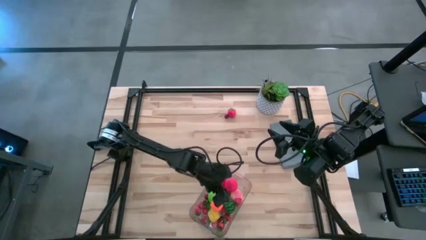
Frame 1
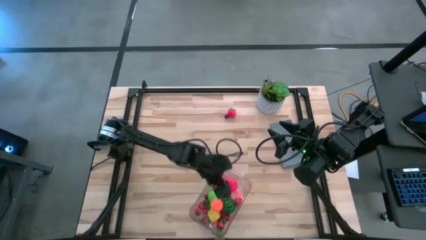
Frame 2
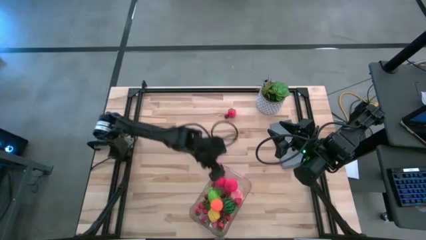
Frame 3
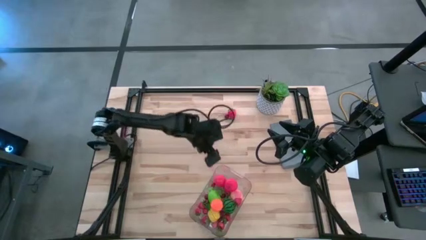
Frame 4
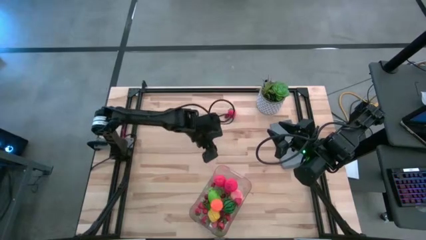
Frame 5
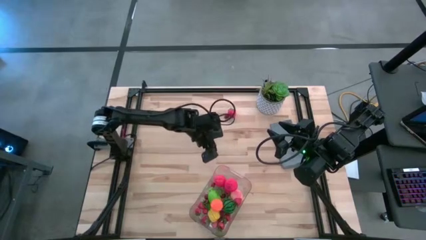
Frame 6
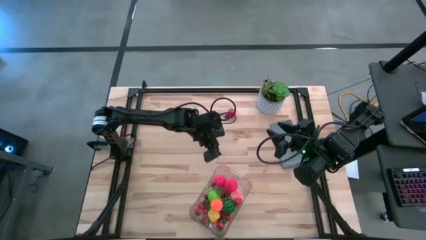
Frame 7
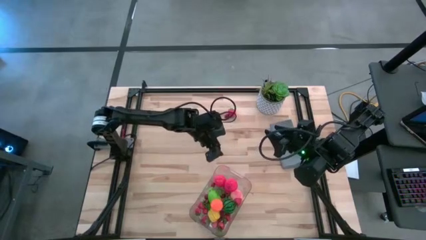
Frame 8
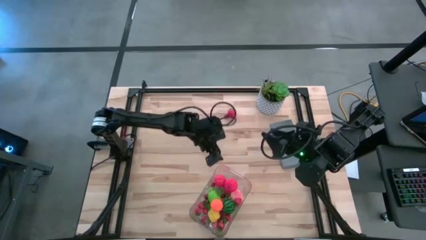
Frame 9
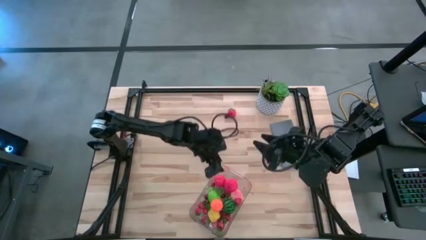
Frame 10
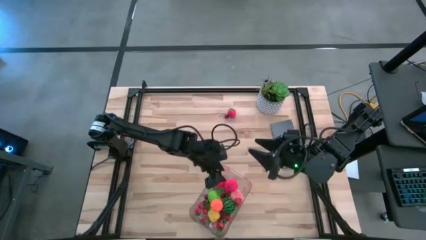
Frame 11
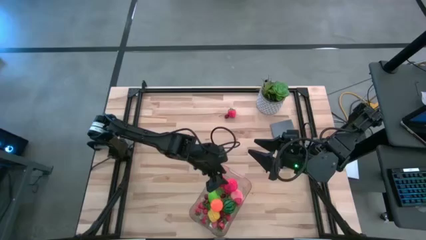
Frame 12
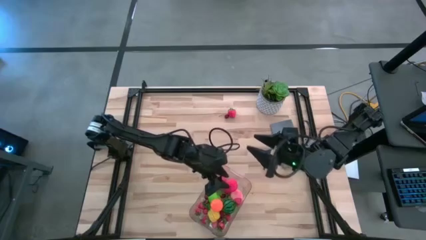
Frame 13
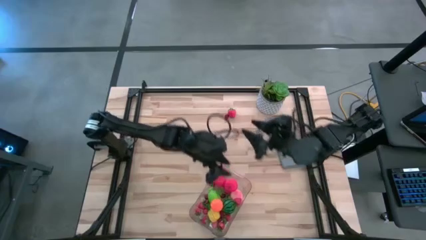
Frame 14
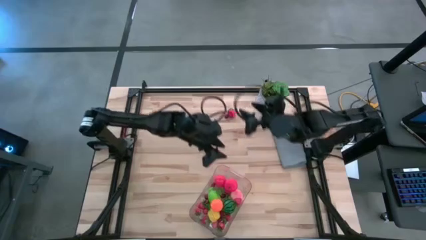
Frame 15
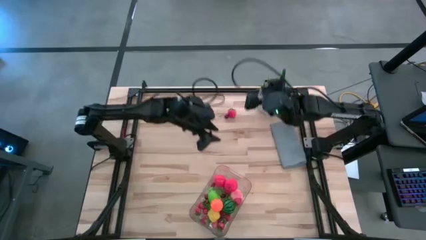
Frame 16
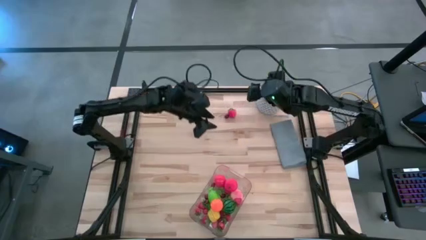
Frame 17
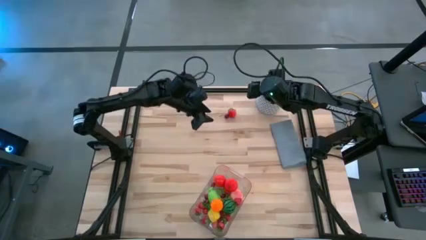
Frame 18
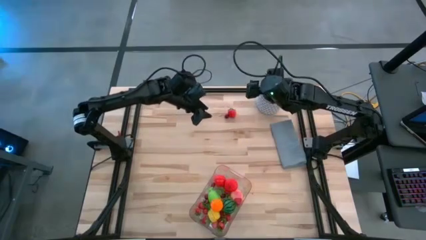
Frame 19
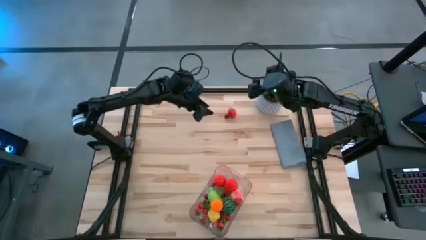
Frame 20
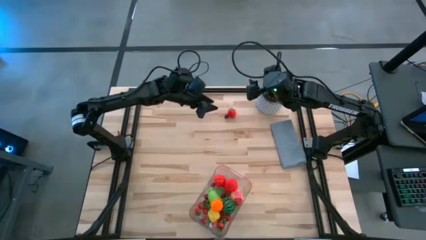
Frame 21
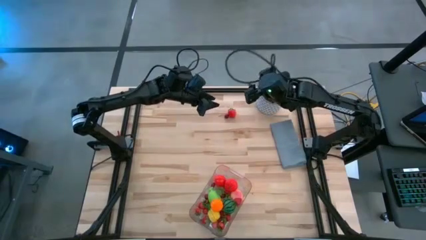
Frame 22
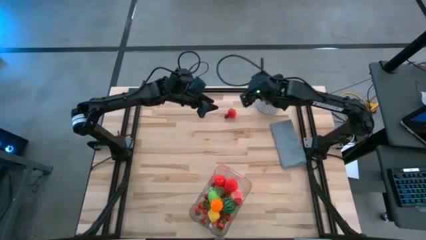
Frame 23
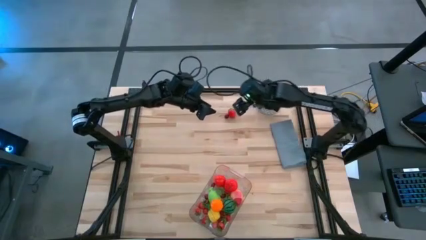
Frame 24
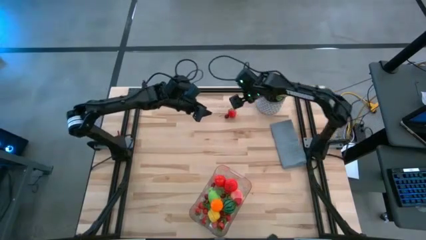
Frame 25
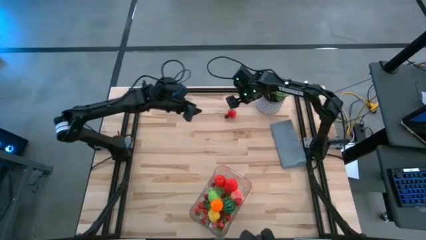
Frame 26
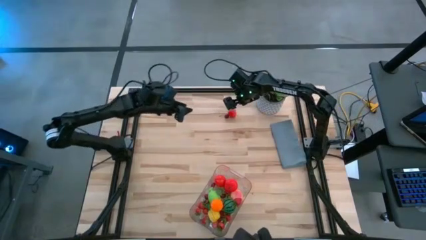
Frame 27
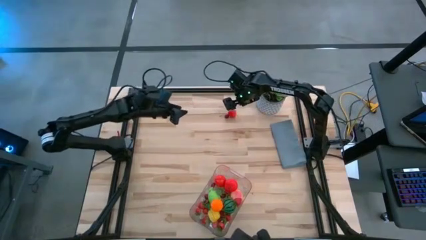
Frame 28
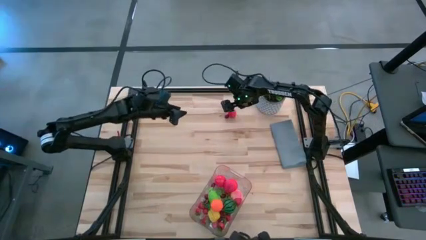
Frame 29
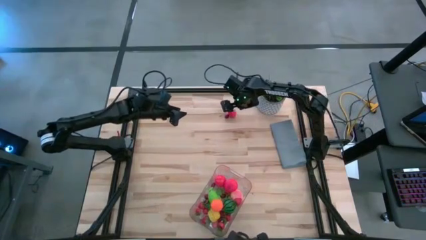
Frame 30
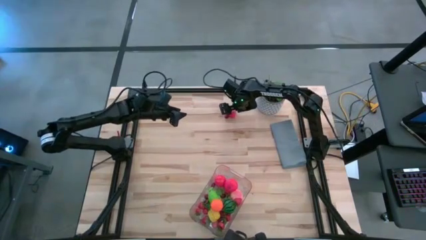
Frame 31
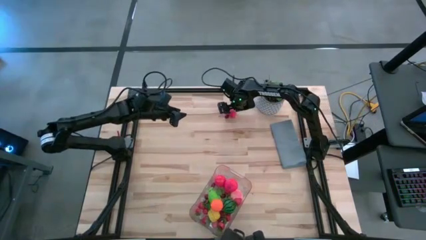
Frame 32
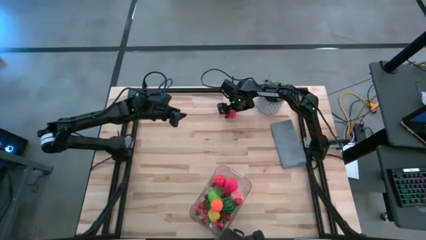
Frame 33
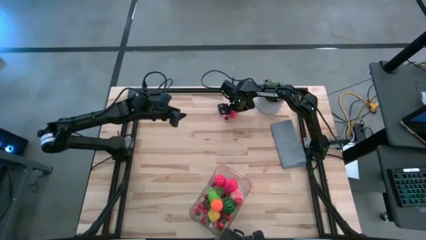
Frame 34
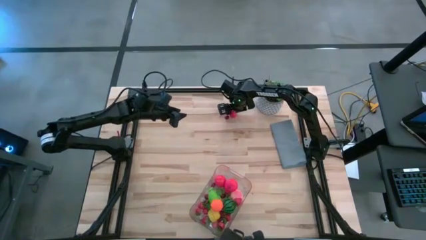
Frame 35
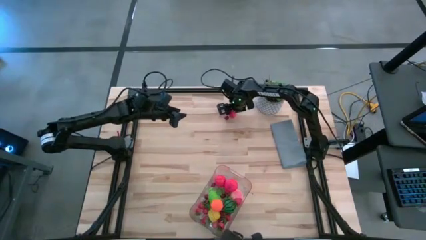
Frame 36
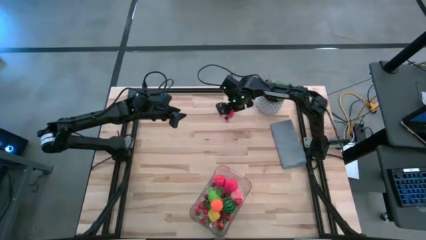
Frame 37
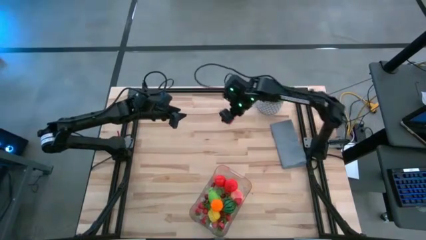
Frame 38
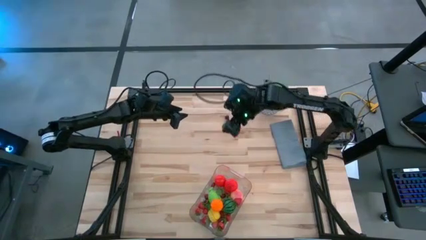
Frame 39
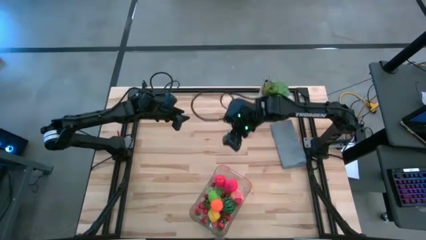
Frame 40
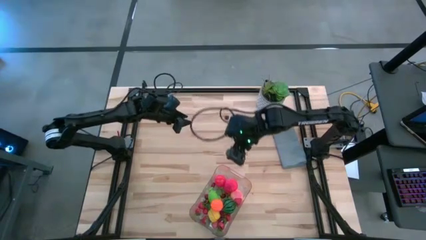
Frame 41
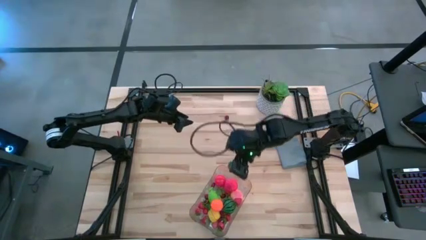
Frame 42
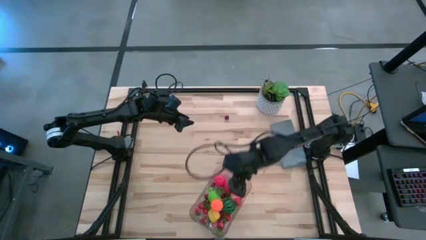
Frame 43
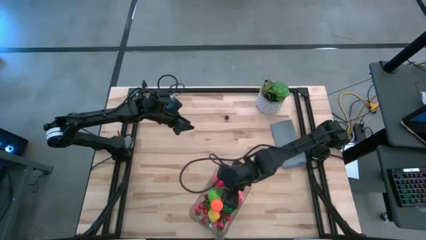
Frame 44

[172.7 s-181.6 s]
Task: Pick and placing Produce into tupperware
Put the red strawberry into the transparent basket

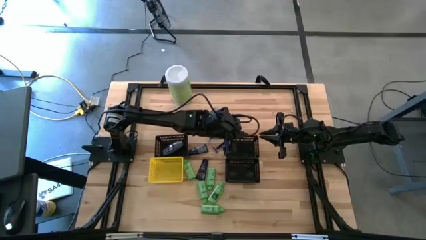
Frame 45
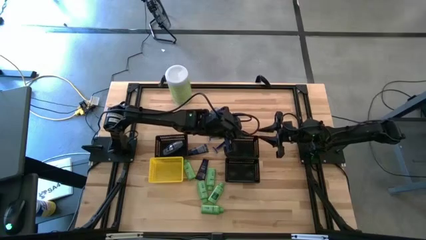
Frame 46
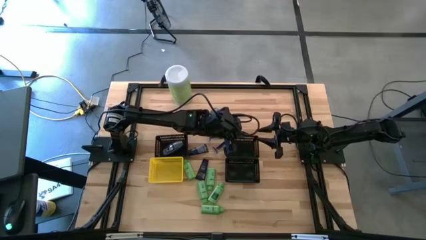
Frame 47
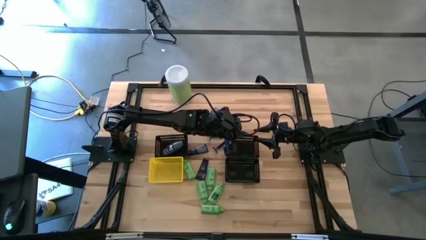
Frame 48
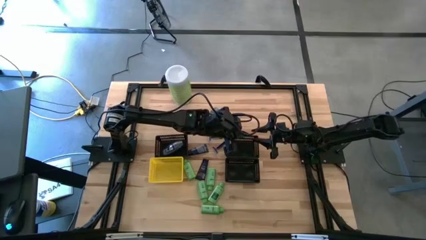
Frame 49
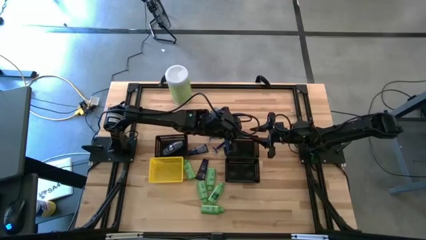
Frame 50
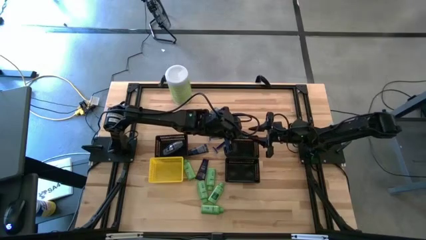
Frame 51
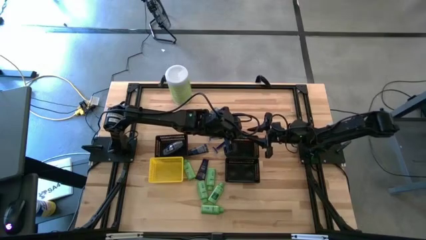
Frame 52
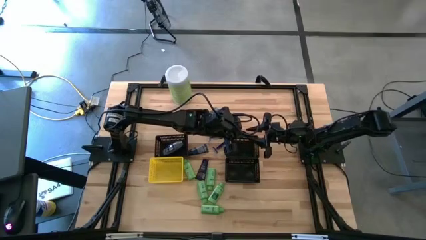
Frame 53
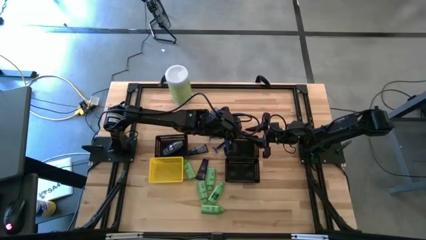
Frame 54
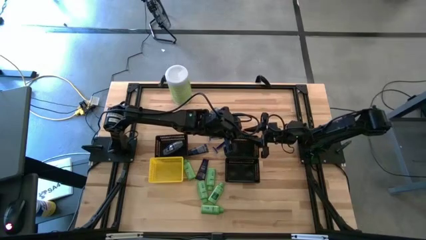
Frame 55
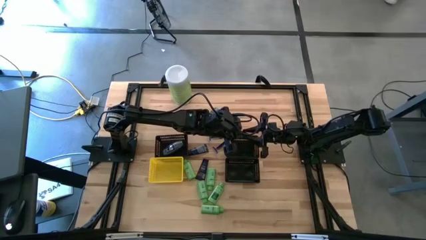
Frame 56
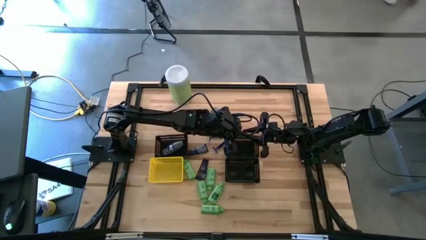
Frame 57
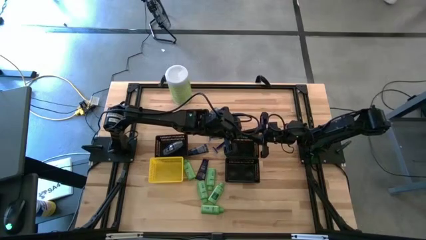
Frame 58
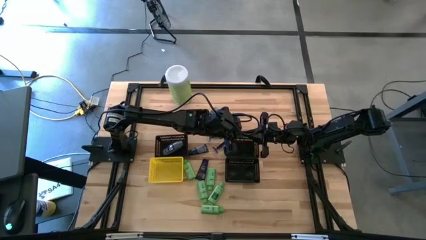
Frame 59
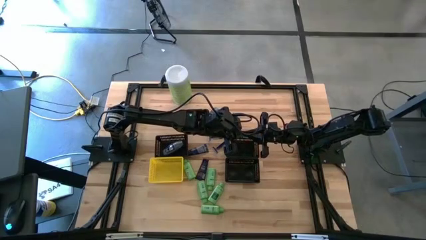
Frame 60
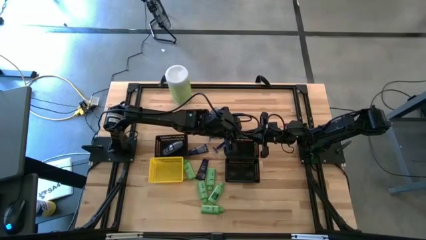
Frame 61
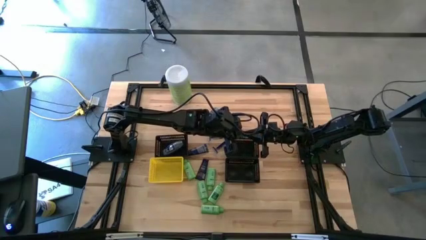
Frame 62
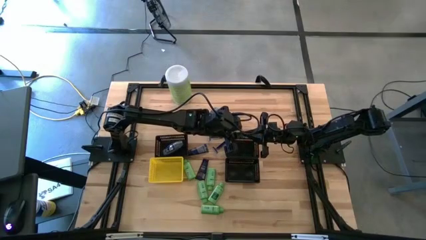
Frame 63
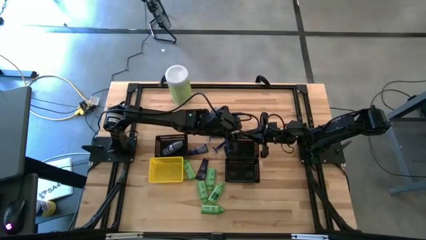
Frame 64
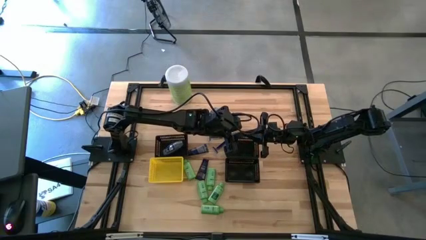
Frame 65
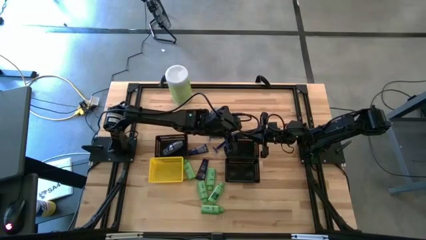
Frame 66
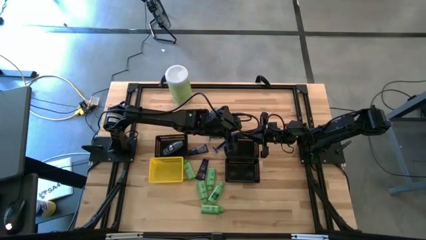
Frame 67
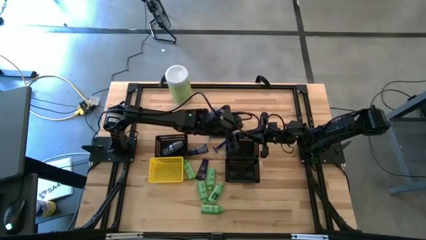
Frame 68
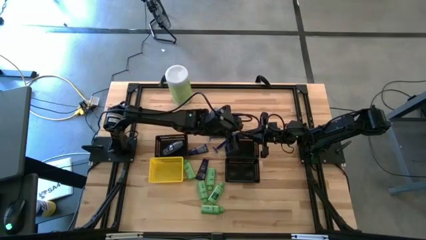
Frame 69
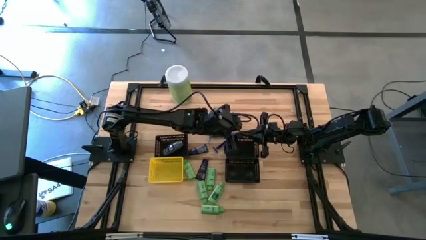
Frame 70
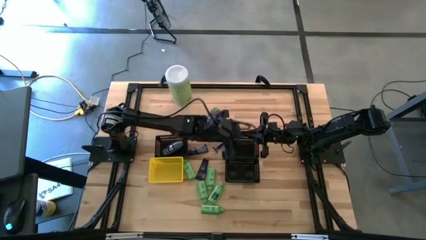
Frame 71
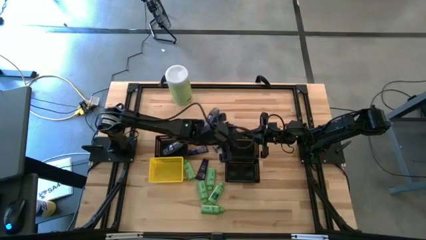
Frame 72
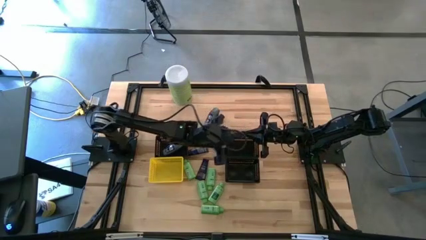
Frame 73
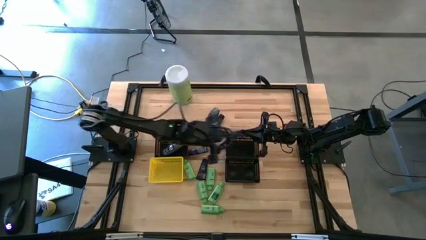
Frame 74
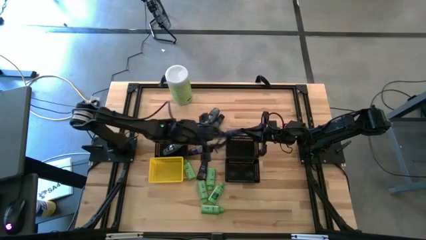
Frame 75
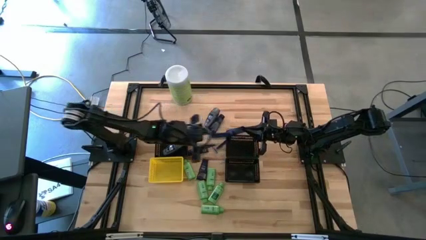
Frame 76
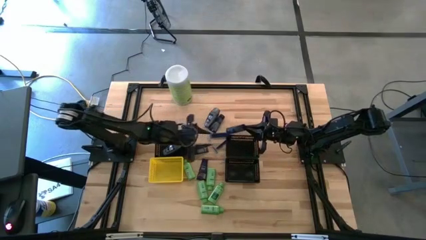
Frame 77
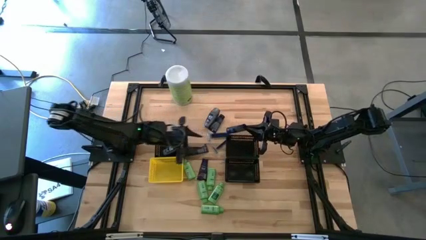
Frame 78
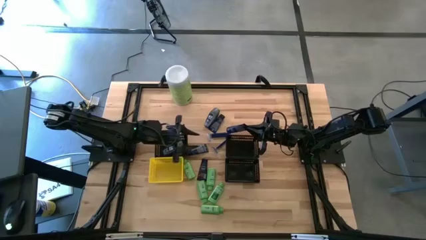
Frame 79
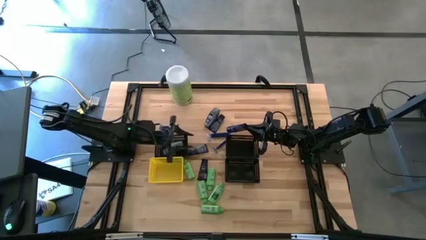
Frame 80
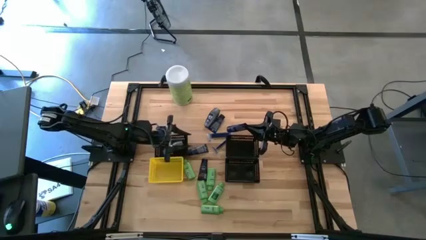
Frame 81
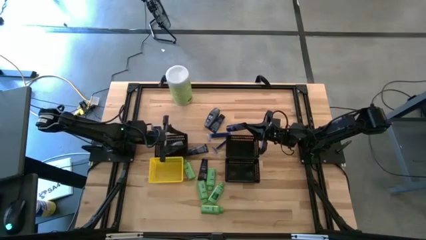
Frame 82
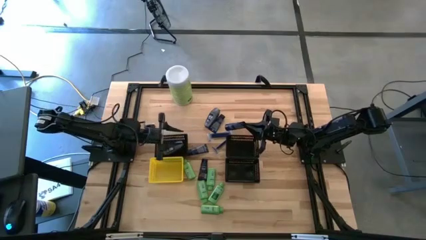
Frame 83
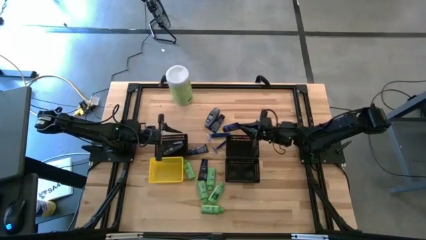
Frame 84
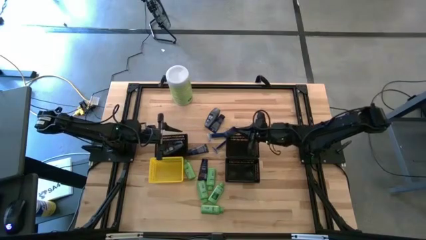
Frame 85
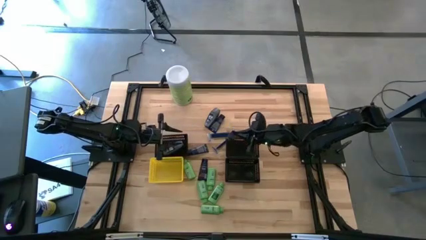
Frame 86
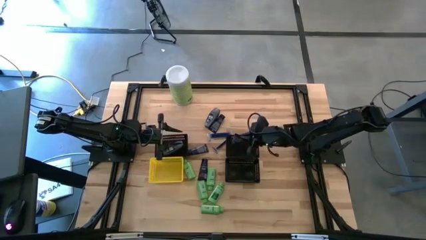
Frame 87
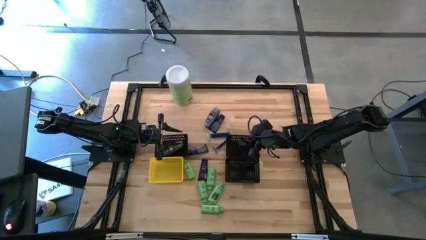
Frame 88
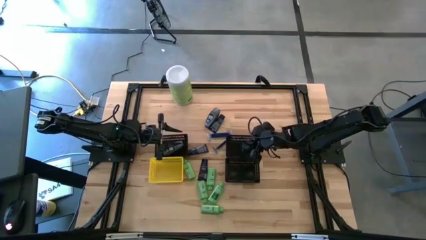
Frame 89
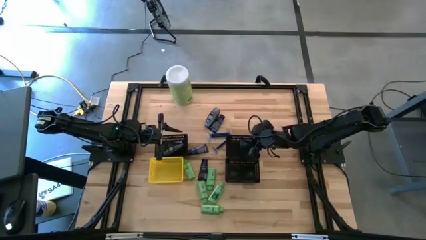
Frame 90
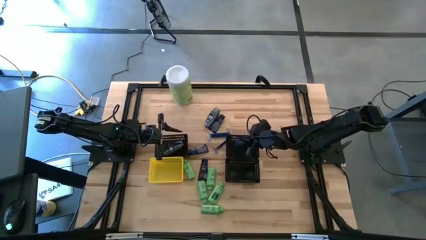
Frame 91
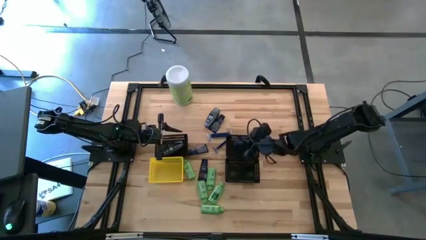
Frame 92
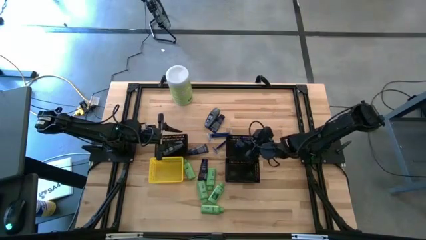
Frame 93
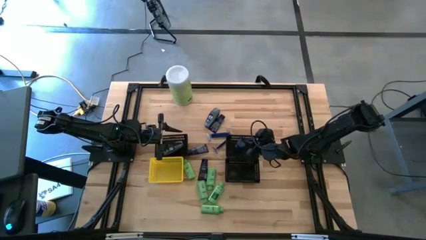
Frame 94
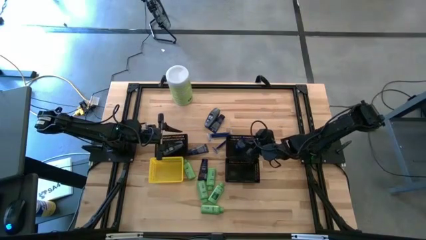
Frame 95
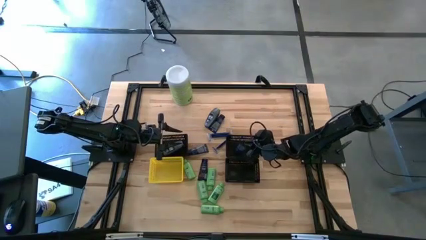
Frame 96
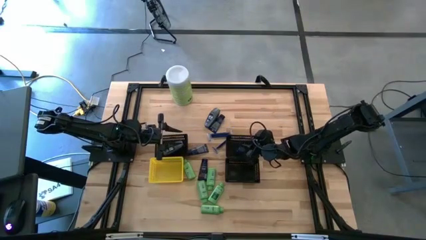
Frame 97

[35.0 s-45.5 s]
Task: Pick & Place Travel size toiletries
Put the blue shave cream into the top right black bin
